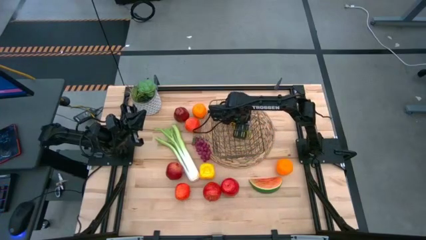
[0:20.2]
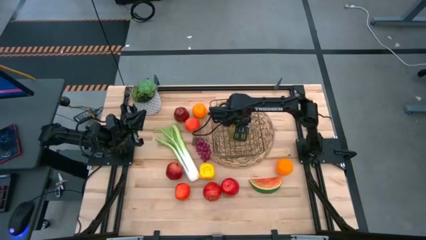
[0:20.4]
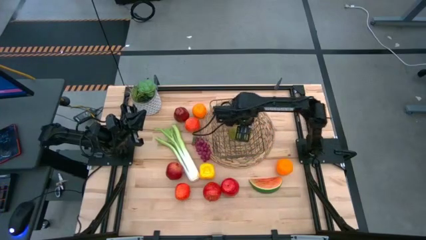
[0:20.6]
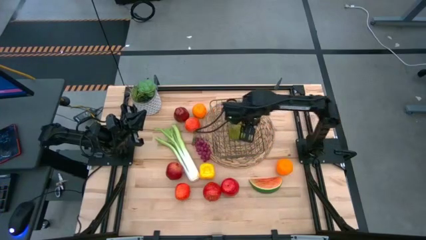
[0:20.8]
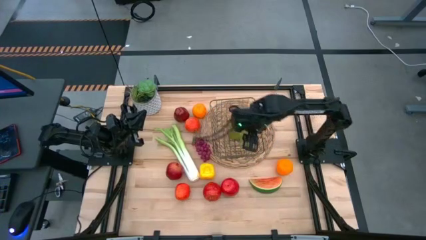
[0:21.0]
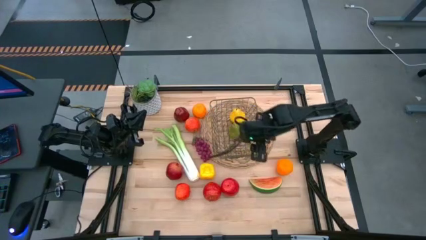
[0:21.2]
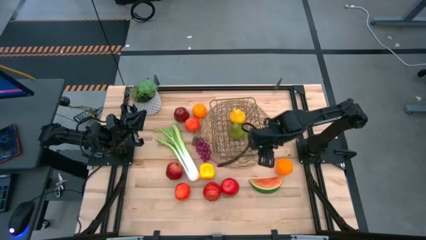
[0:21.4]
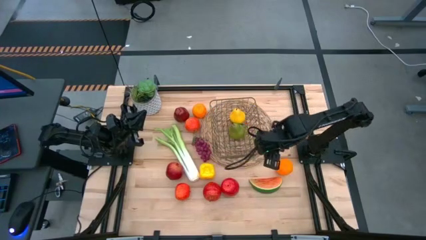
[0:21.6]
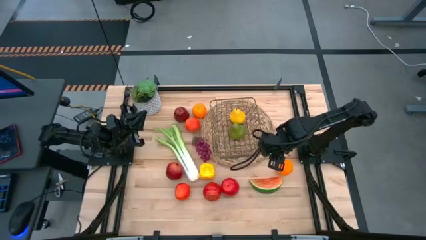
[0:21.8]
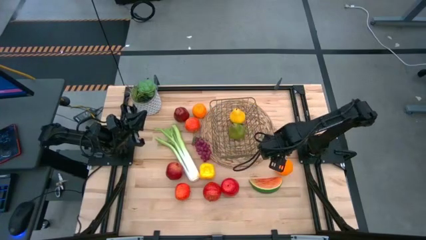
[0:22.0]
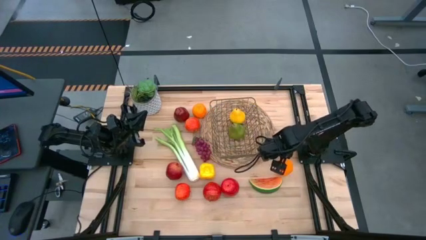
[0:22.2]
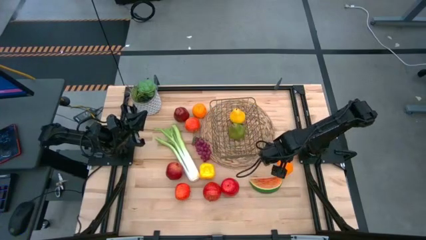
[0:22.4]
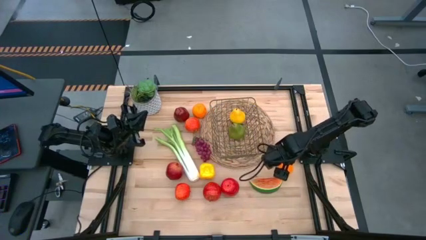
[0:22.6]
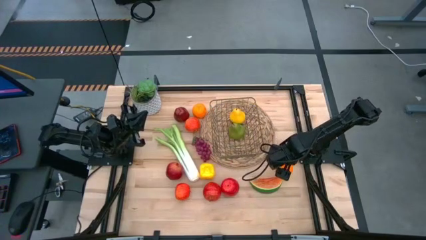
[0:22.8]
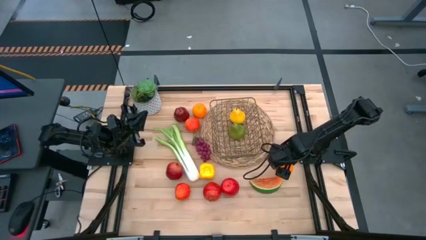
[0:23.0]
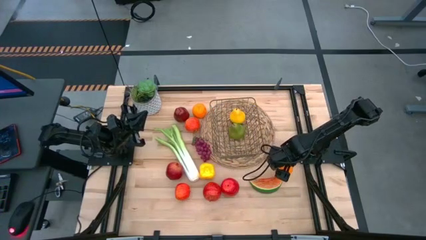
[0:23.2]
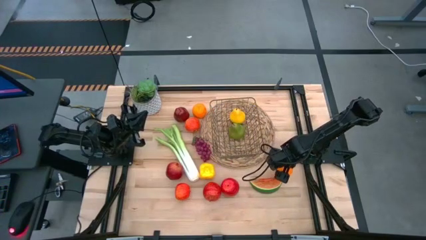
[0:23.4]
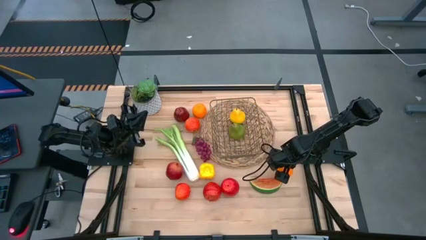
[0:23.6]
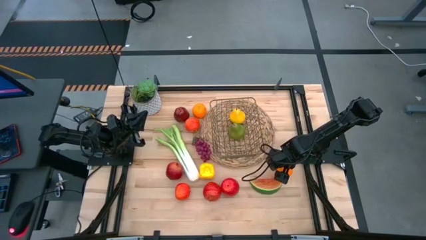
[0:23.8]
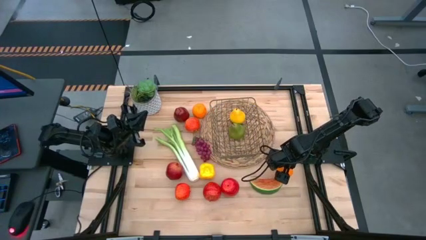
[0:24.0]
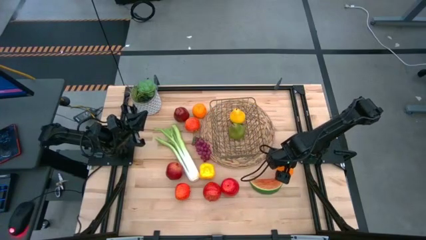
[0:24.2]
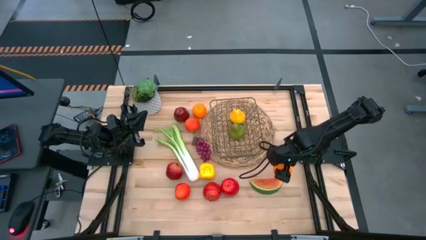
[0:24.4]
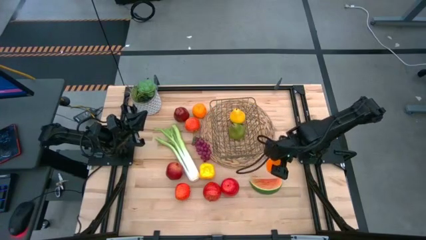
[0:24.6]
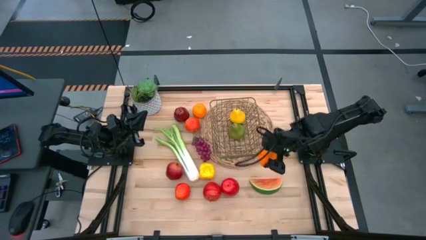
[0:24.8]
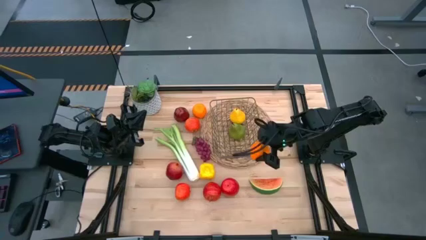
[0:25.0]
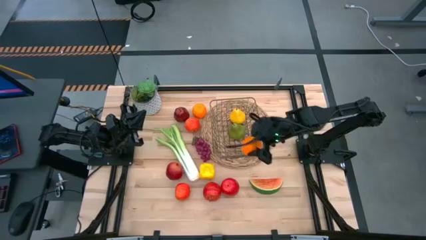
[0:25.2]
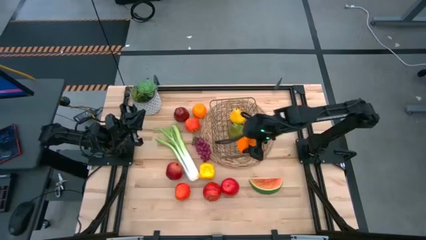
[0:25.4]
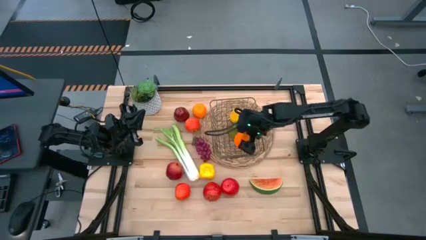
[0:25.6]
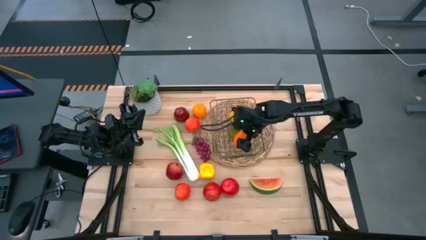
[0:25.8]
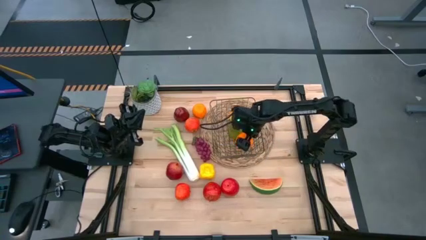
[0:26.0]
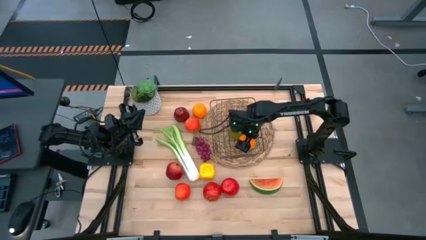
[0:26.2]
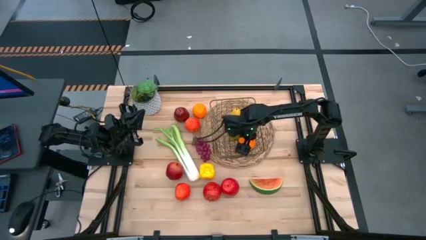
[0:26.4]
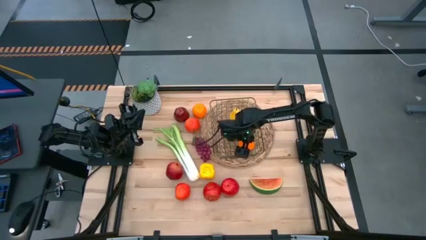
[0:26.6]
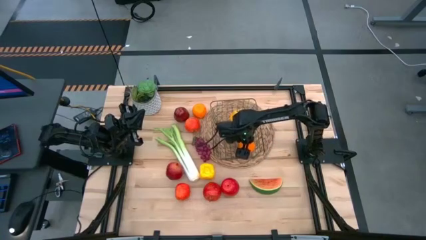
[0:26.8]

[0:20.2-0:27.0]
Task: Build produce basket
Put the orange into the wire basket

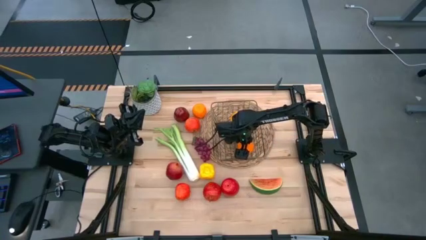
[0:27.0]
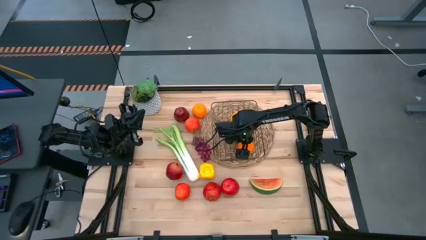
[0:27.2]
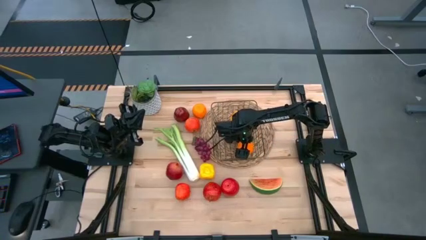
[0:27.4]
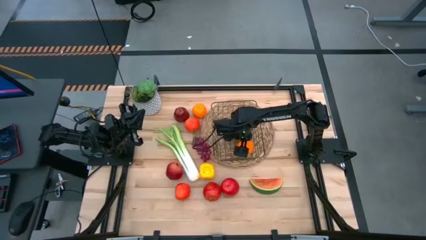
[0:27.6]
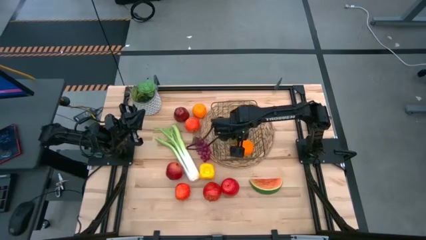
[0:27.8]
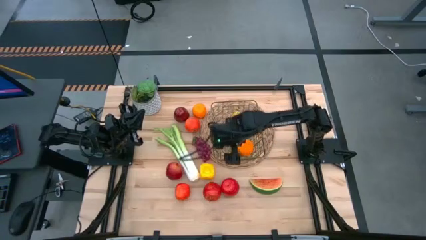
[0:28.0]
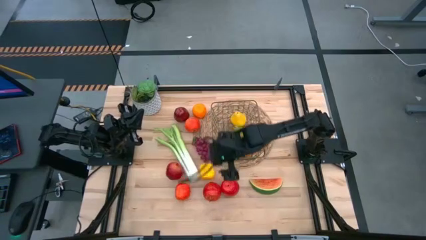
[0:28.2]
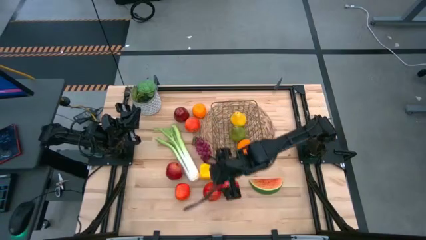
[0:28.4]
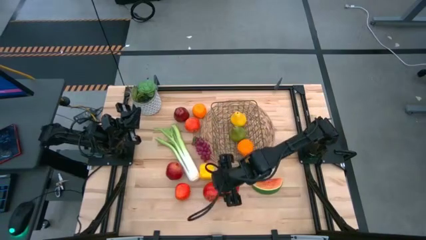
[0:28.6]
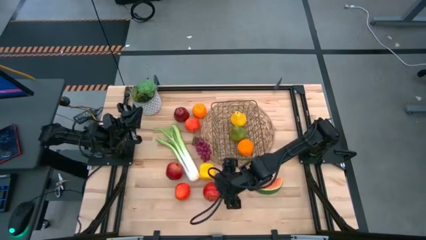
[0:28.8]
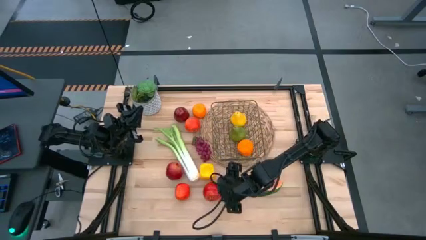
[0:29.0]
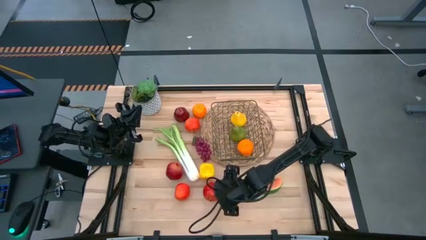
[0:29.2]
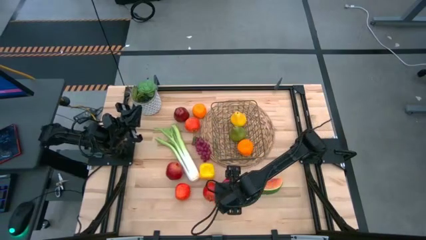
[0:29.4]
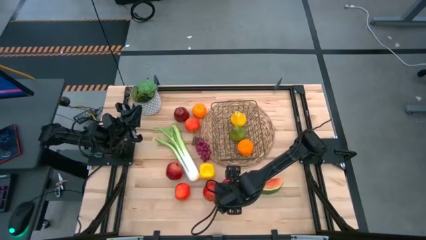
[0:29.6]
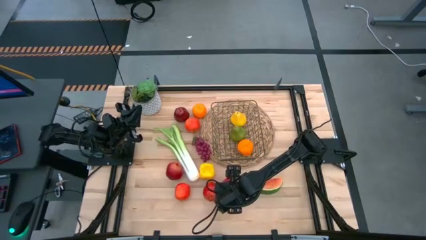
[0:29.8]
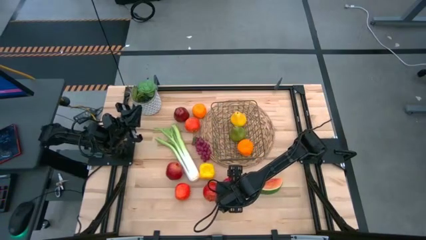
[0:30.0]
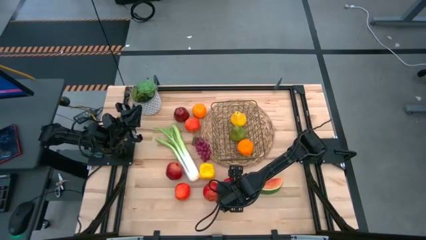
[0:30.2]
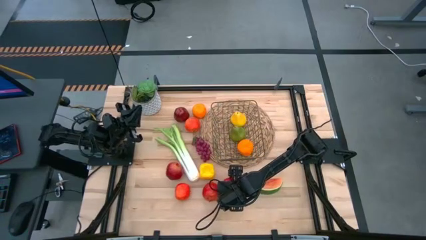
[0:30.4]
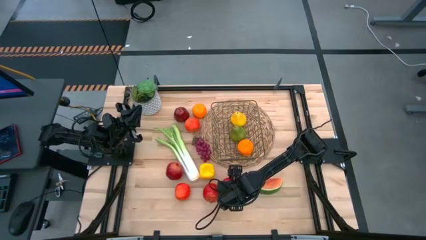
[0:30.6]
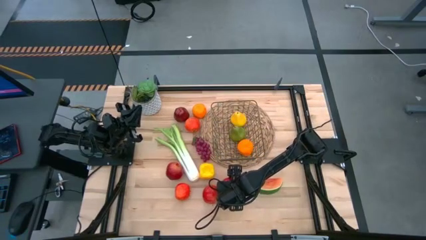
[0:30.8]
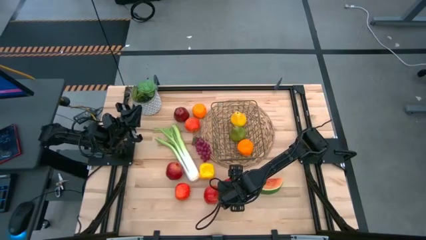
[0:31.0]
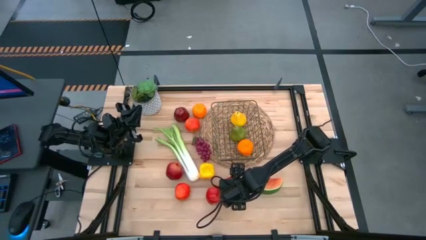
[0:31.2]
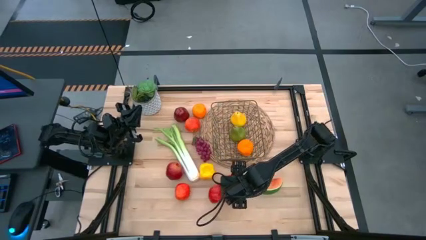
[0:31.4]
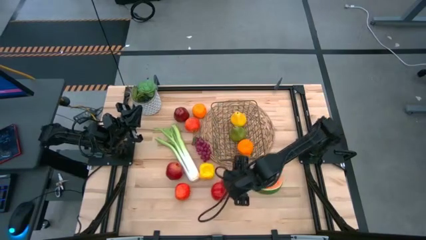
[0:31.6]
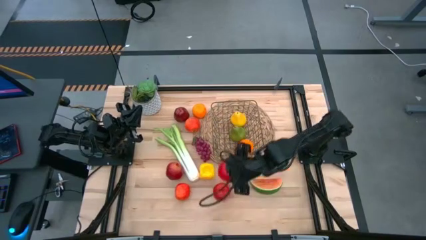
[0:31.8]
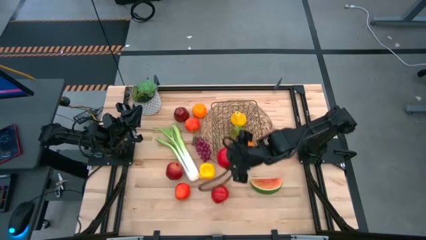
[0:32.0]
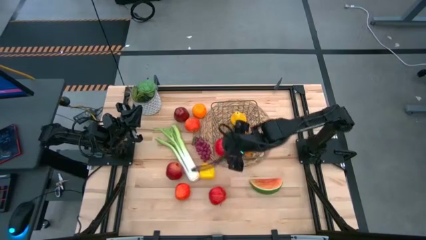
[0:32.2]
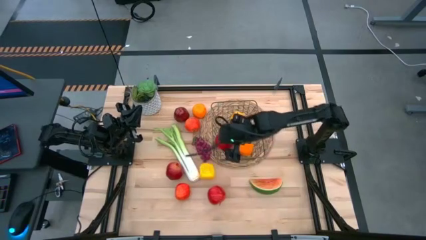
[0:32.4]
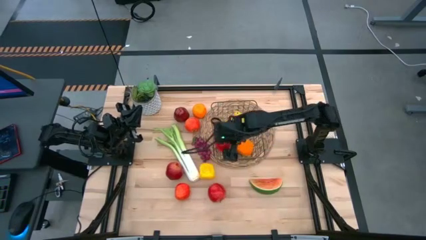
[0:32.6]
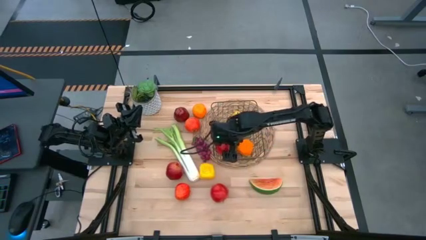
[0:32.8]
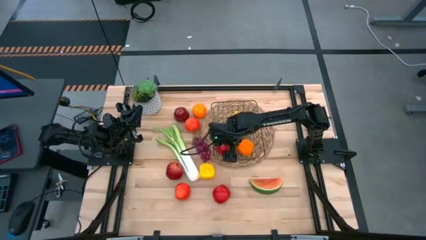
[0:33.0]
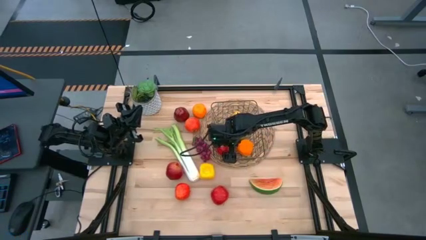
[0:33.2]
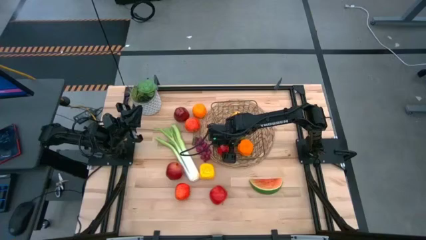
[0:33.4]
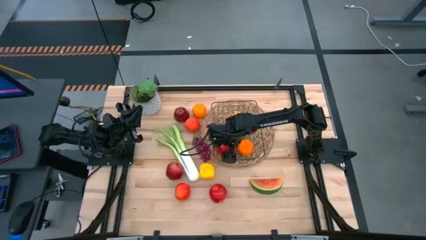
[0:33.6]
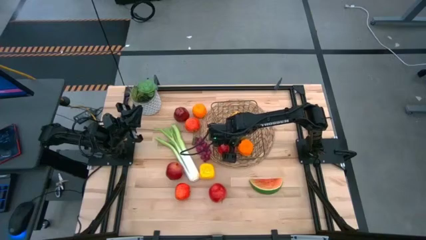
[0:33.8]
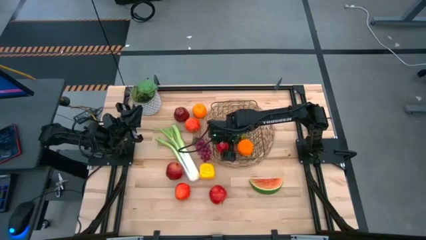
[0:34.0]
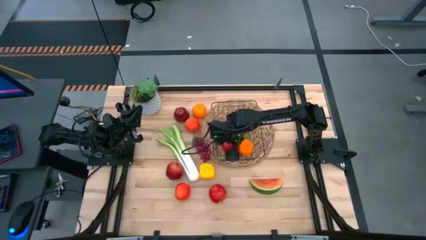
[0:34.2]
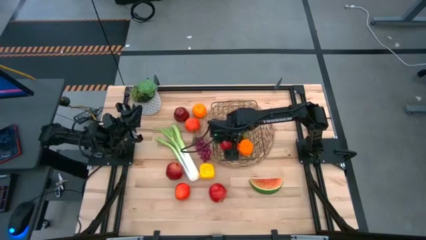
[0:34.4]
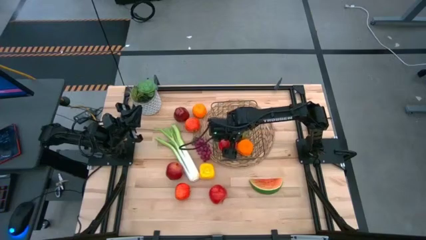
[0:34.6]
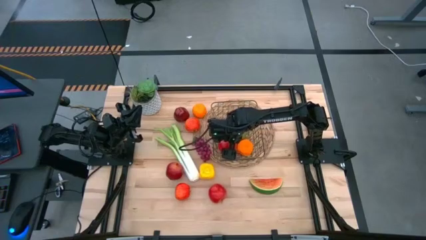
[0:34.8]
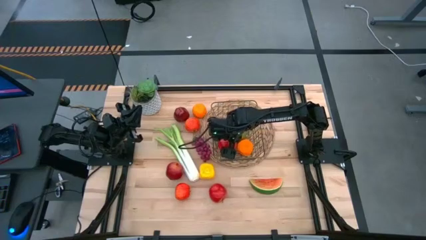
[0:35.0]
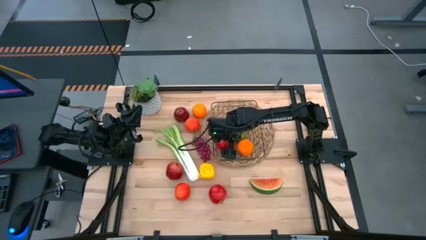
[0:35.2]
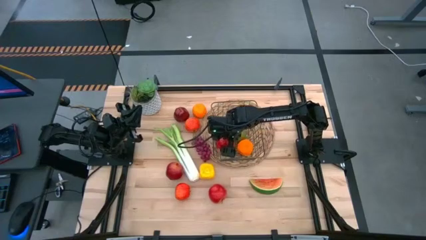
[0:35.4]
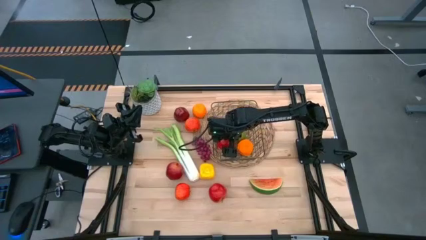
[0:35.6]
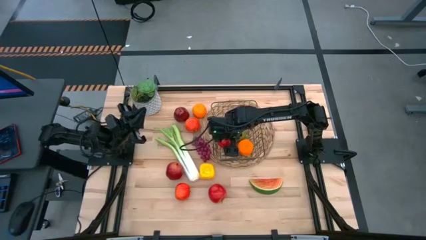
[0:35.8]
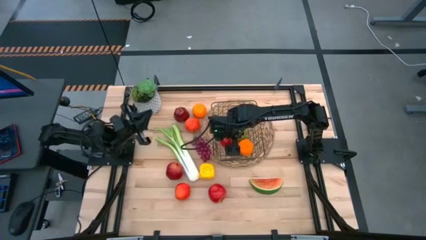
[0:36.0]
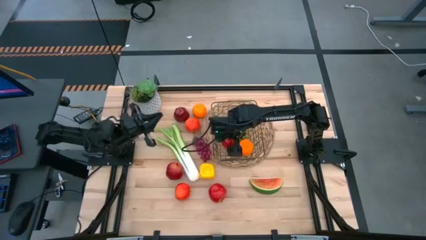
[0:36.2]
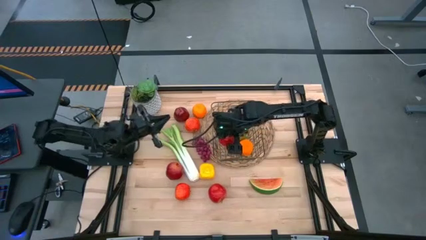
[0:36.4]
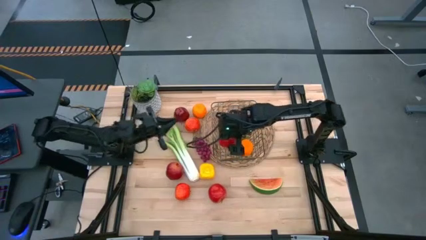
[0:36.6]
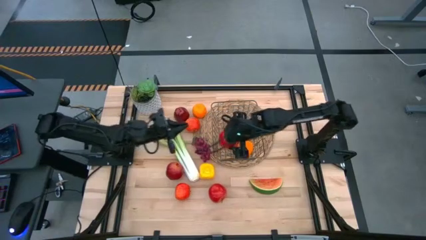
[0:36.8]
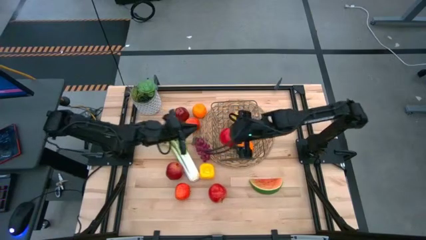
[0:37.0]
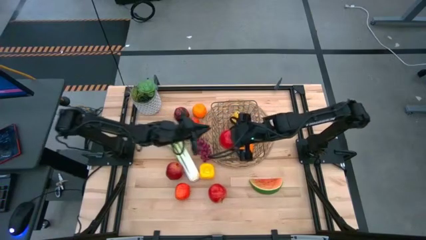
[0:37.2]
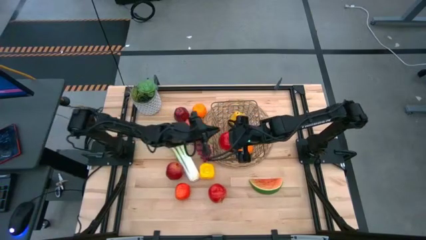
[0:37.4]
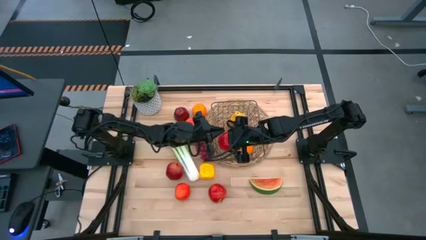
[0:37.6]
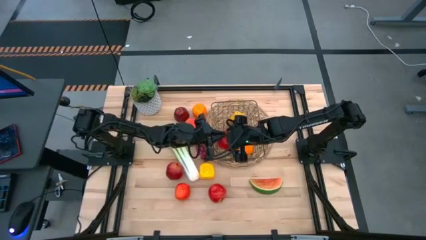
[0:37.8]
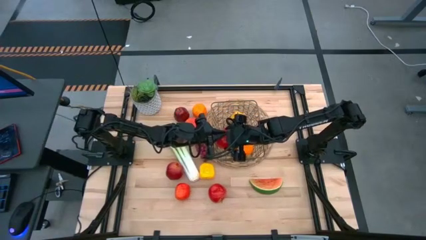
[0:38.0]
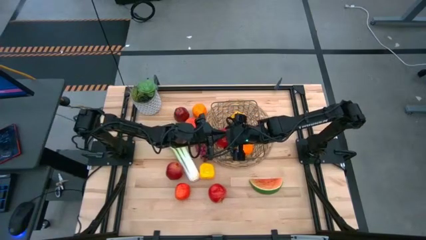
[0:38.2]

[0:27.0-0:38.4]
Put the apple into the wire basket
